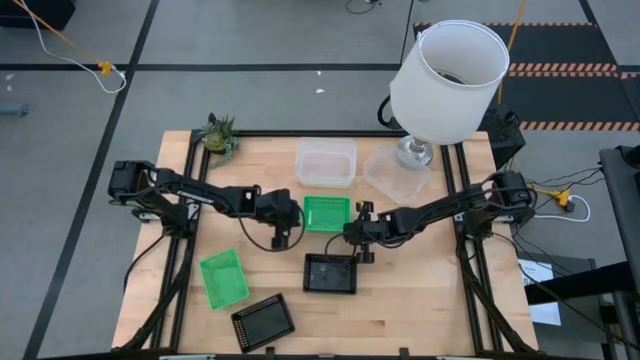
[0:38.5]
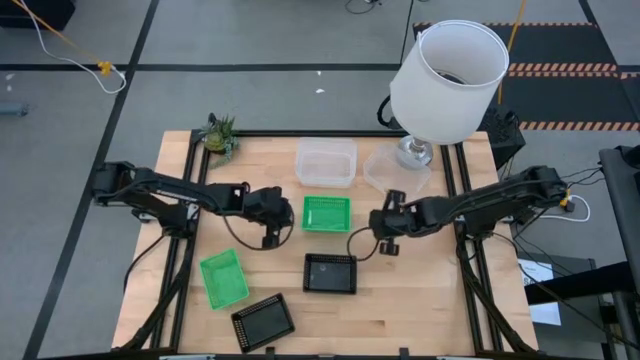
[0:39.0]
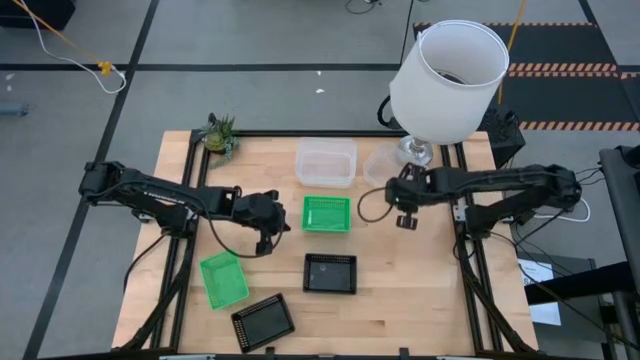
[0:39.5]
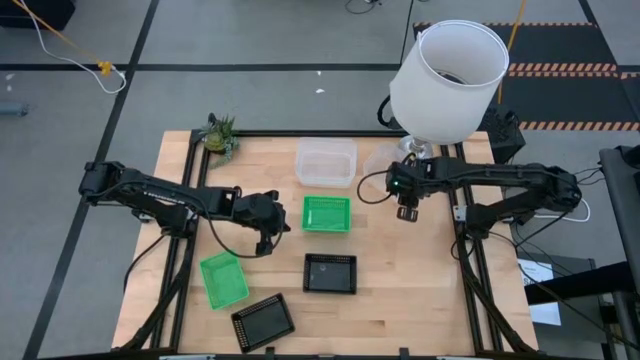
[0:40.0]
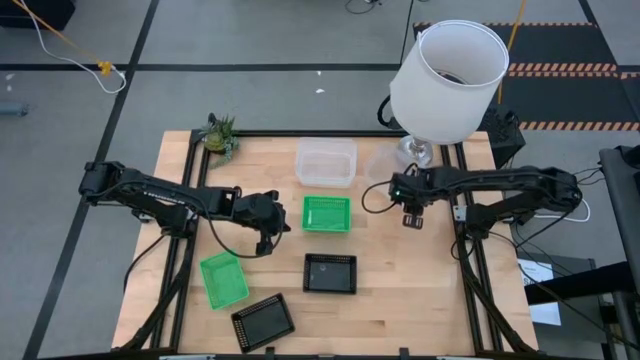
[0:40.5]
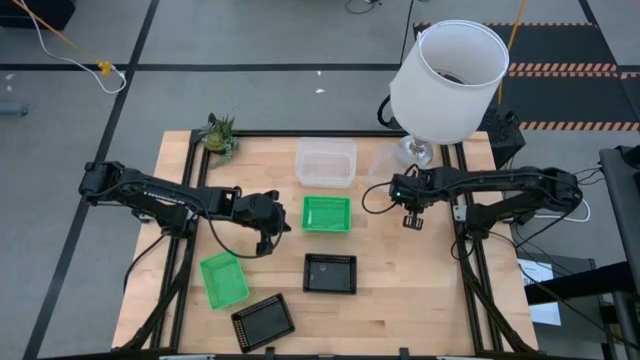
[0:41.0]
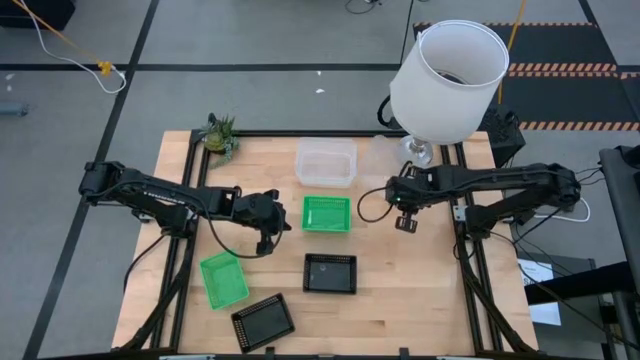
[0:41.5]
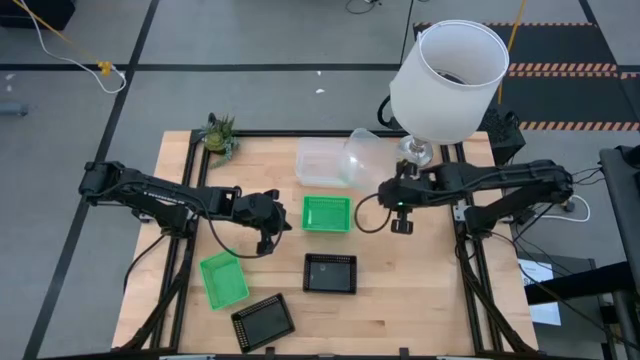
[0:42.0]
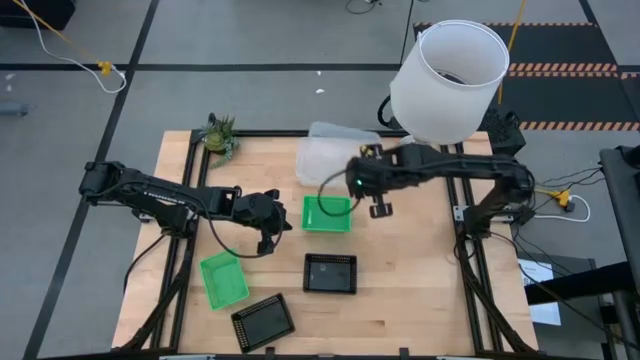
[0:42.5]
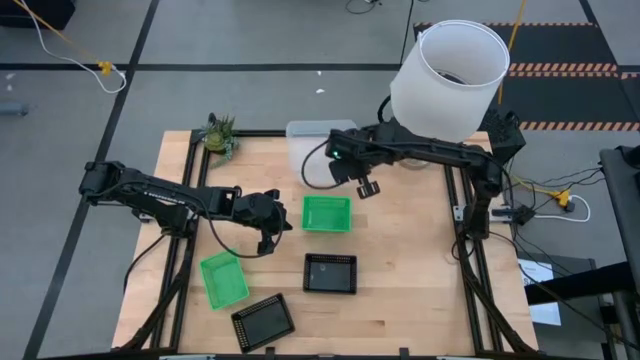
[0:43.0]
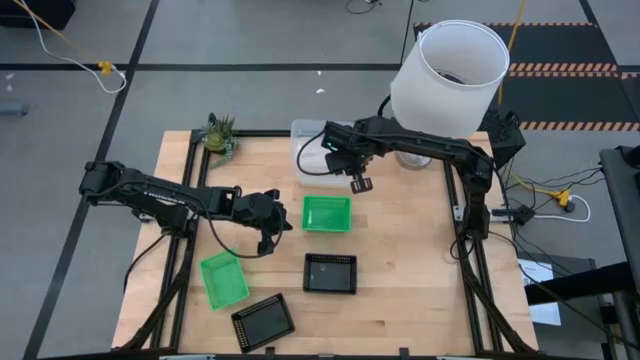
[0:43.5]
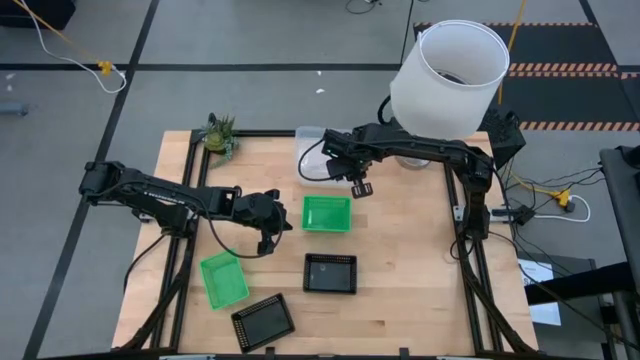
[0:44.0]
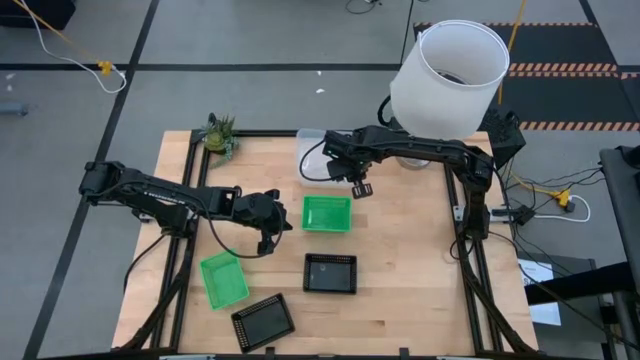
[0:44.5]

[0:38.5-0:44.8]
Stack the right transparent bin on top of the left transparent bins

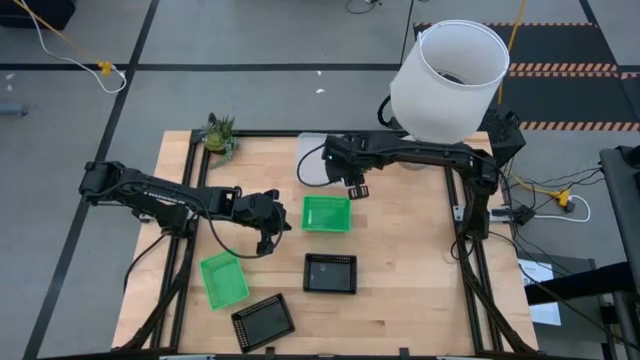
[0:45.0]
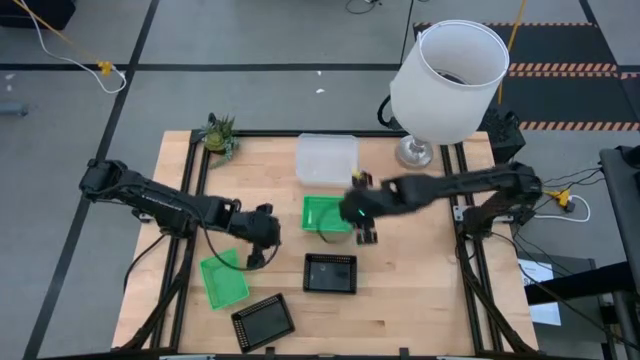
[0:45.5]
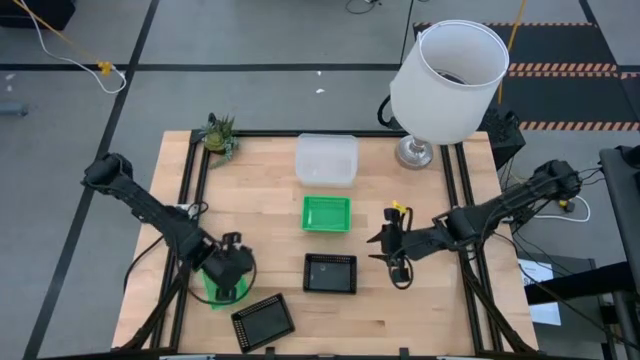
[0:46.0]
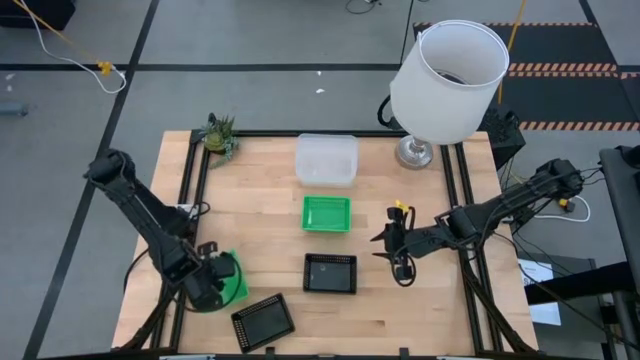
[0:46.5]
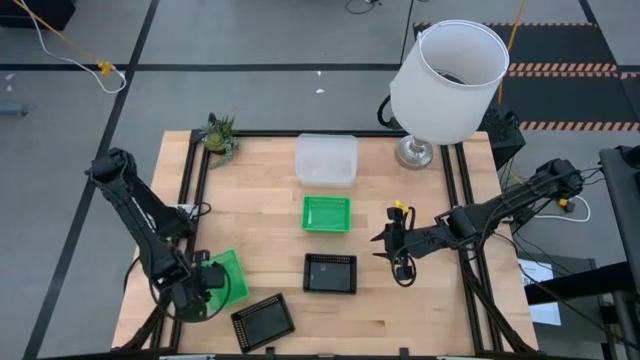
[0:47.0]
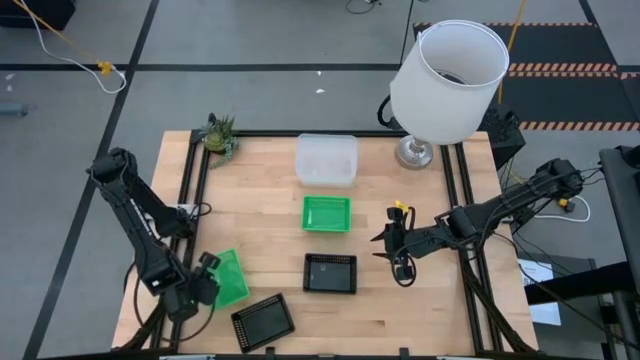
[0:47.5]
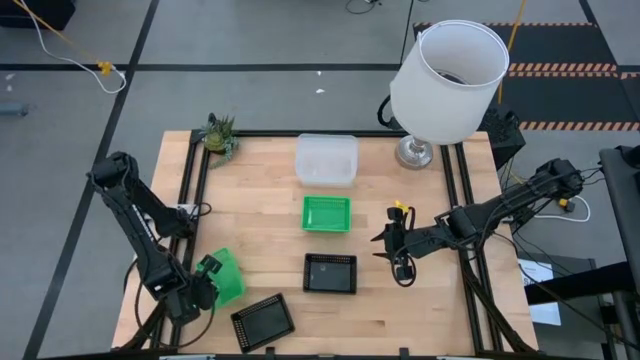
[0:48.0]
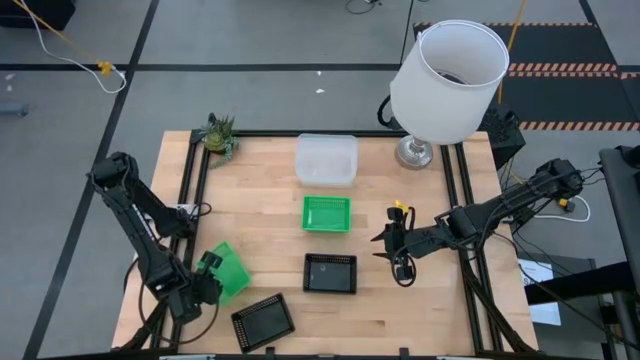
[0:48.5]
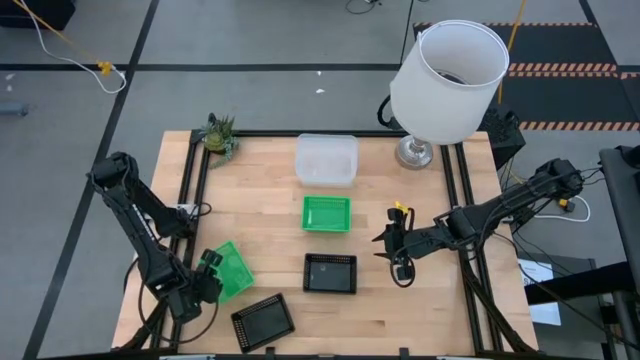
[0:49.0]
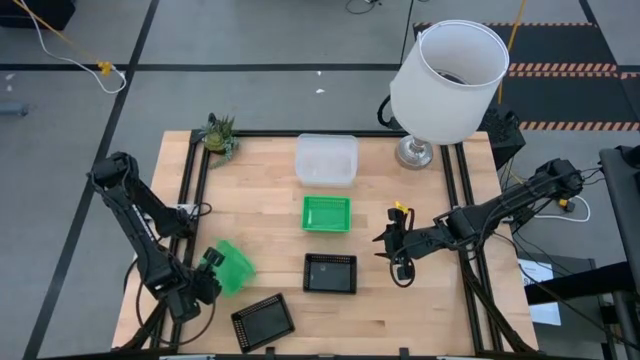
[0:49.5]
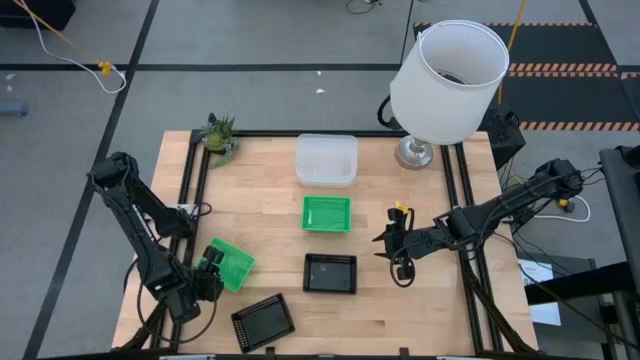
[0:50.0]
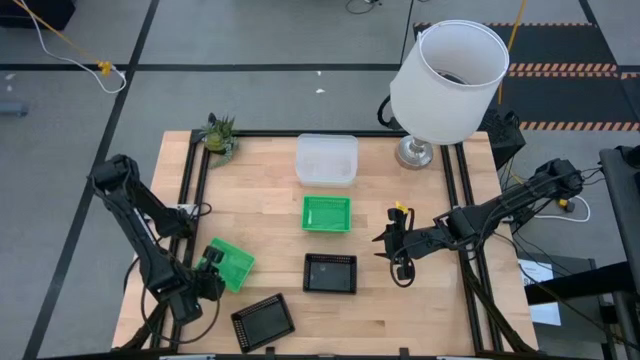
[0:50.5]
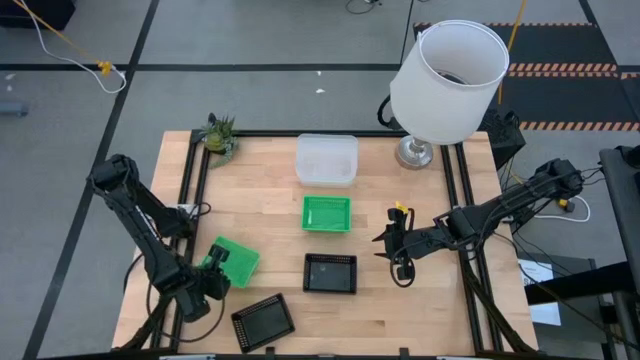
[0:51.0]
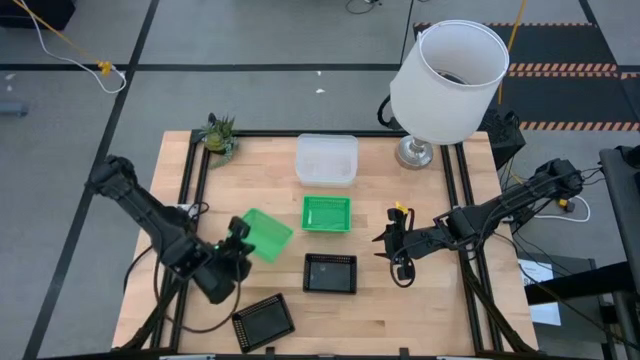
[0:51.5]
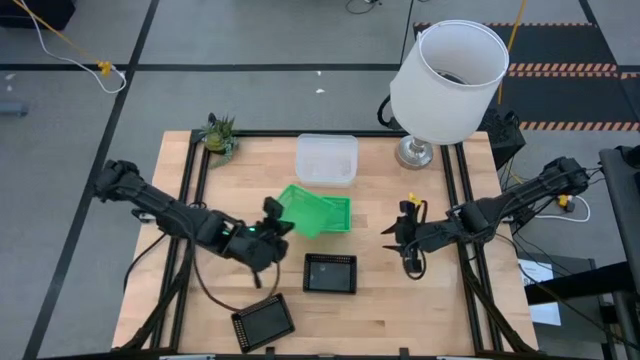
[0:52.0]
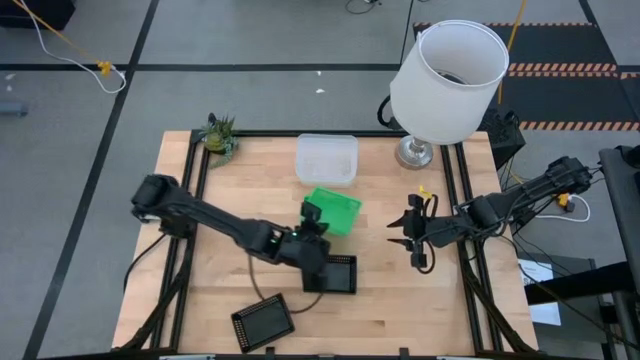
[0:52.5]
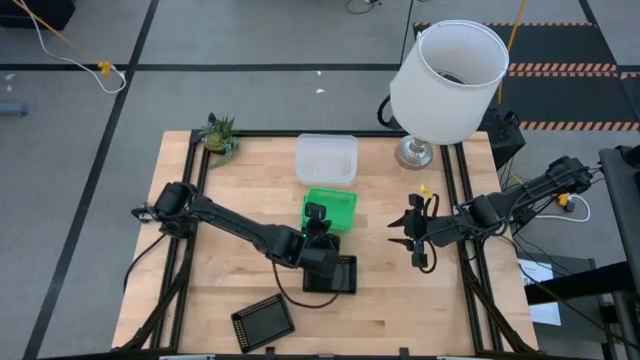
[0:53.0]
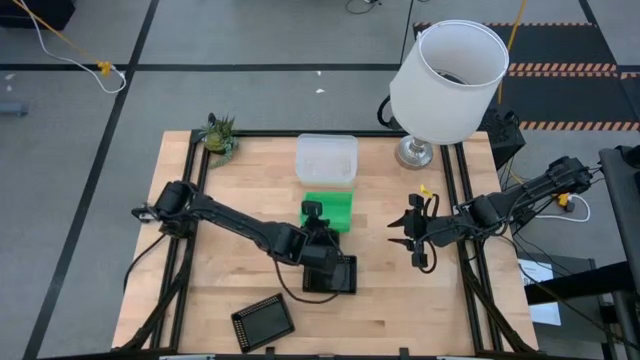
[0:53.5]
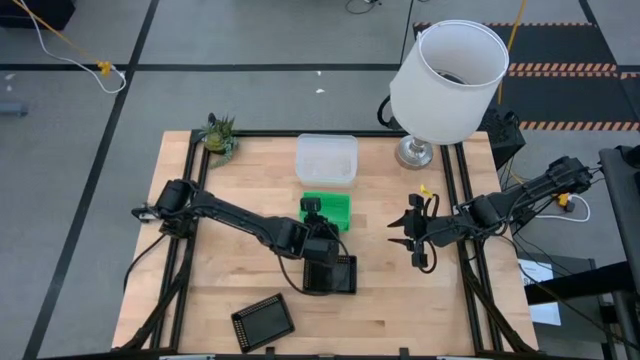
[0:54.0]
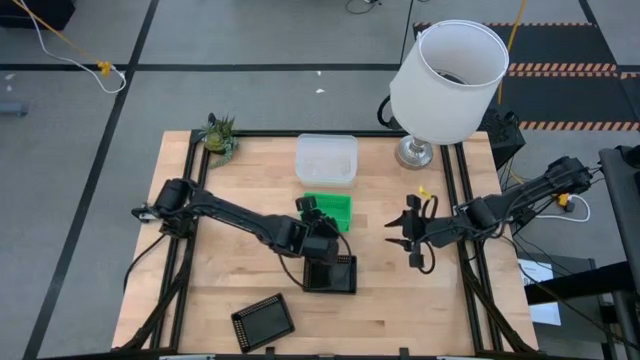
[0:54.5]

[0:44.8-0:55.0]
Stack the left green bin on top of the right green bins
